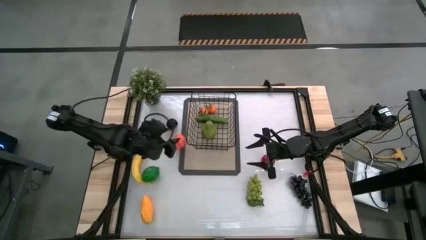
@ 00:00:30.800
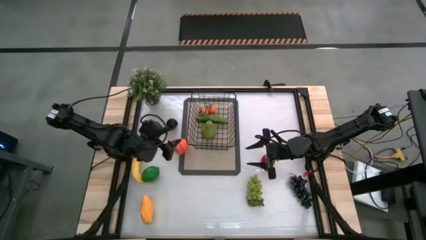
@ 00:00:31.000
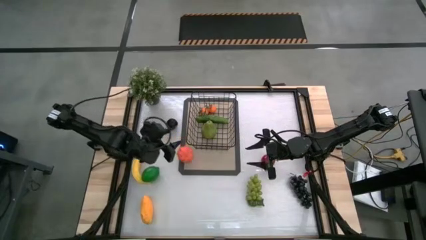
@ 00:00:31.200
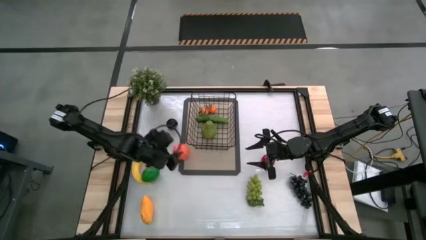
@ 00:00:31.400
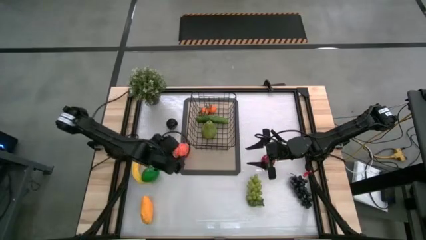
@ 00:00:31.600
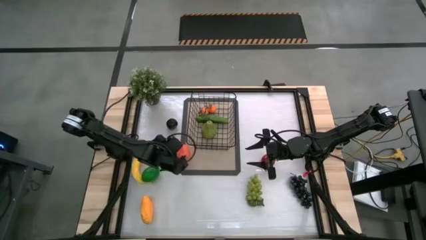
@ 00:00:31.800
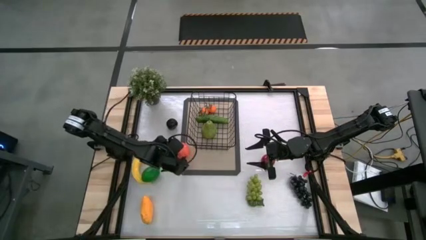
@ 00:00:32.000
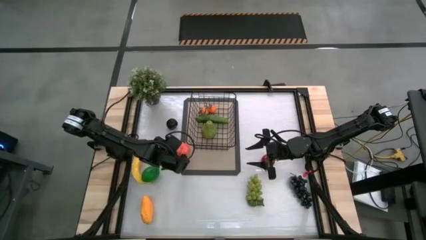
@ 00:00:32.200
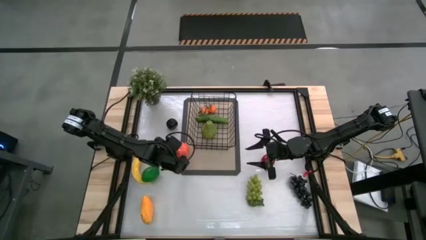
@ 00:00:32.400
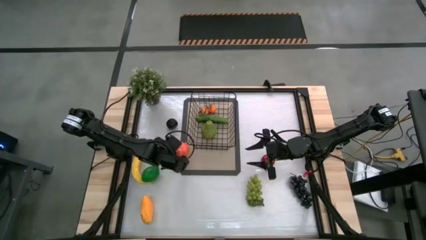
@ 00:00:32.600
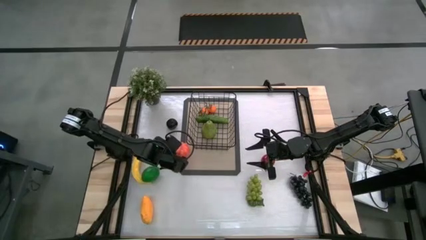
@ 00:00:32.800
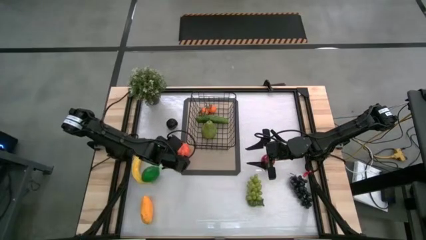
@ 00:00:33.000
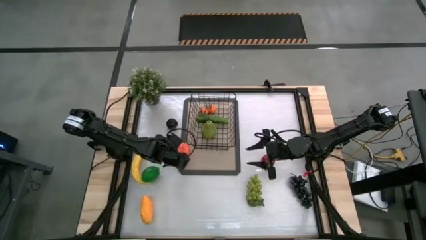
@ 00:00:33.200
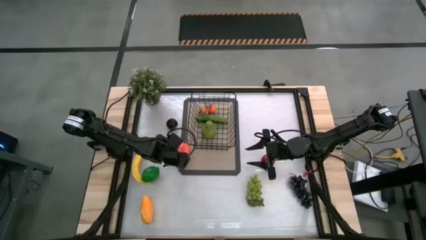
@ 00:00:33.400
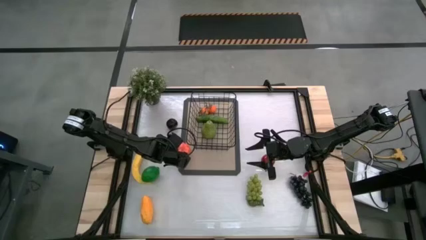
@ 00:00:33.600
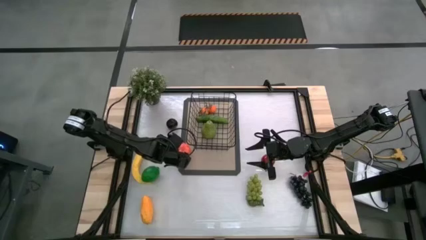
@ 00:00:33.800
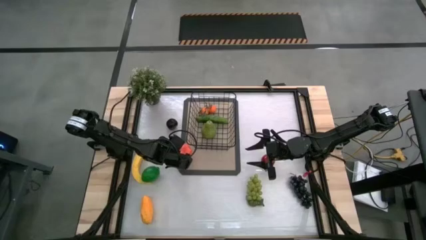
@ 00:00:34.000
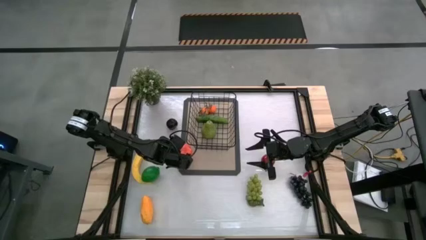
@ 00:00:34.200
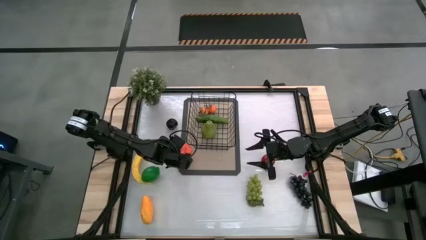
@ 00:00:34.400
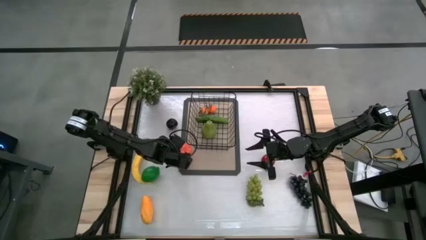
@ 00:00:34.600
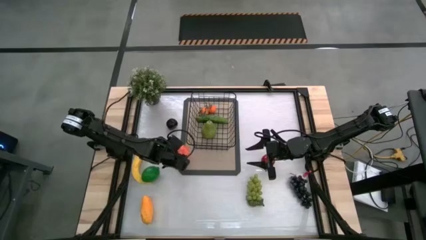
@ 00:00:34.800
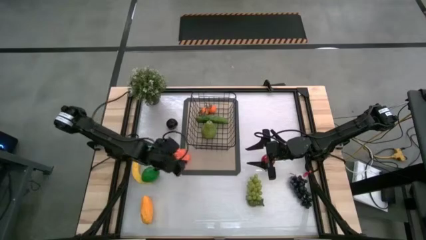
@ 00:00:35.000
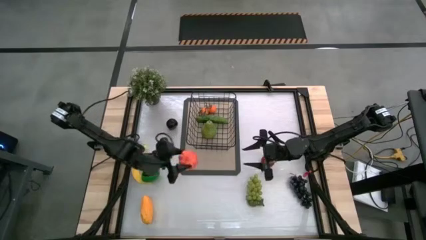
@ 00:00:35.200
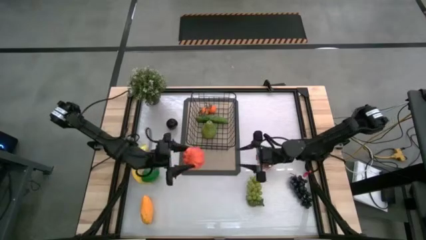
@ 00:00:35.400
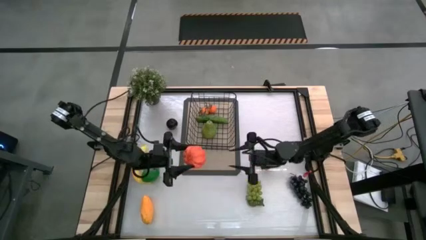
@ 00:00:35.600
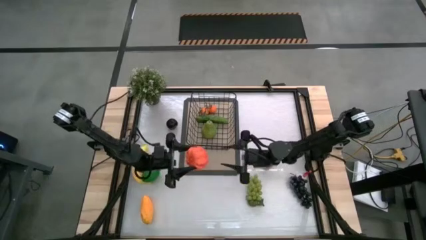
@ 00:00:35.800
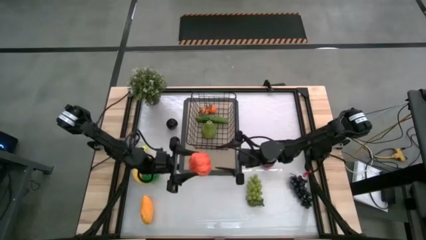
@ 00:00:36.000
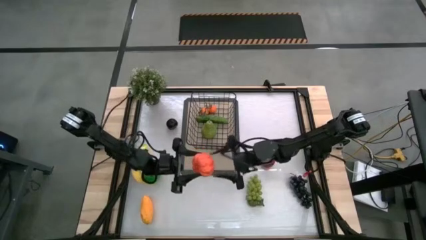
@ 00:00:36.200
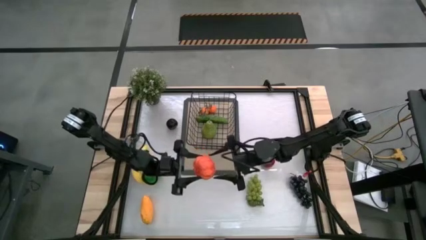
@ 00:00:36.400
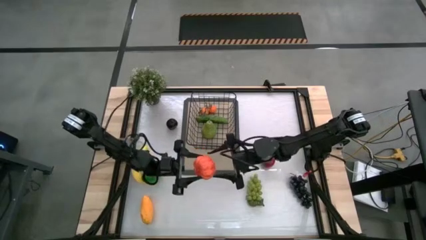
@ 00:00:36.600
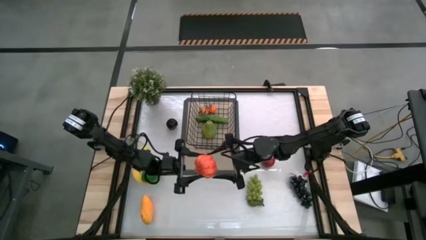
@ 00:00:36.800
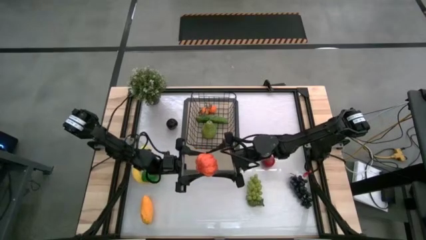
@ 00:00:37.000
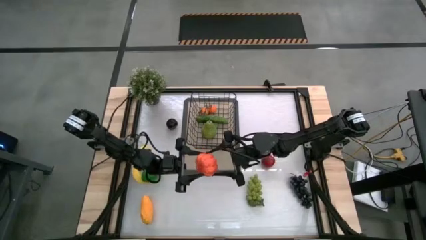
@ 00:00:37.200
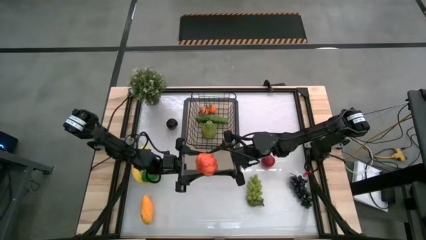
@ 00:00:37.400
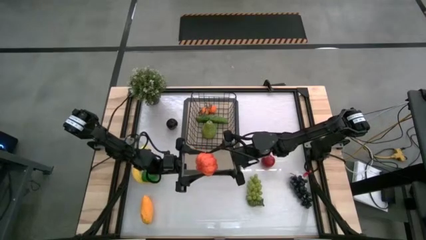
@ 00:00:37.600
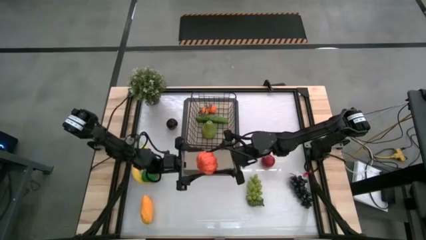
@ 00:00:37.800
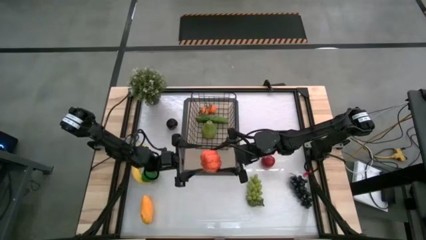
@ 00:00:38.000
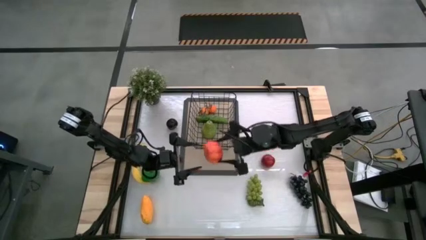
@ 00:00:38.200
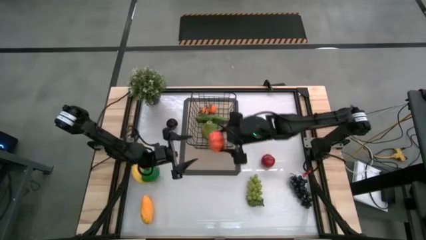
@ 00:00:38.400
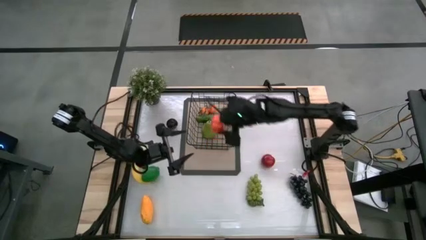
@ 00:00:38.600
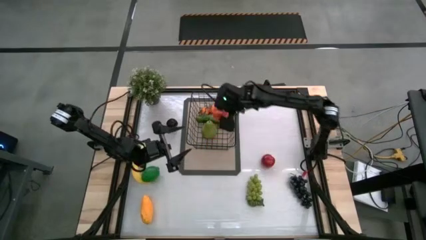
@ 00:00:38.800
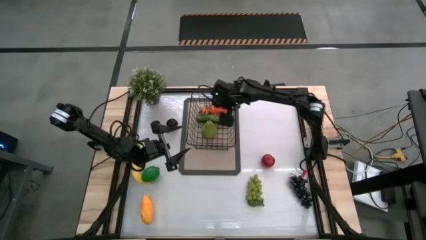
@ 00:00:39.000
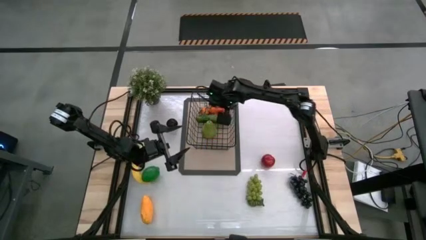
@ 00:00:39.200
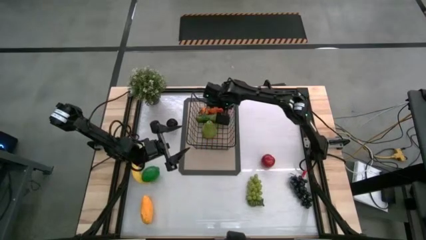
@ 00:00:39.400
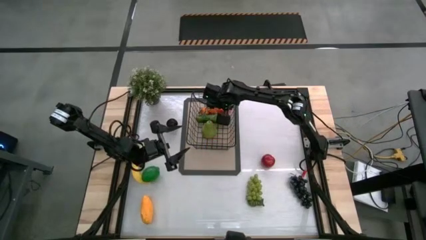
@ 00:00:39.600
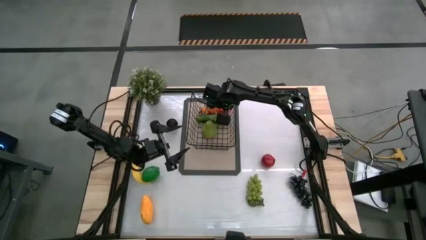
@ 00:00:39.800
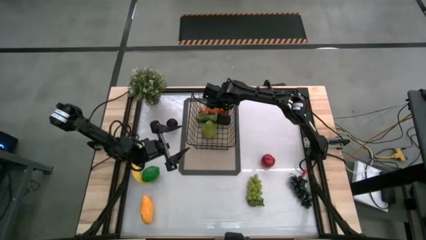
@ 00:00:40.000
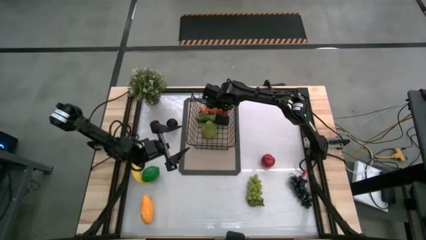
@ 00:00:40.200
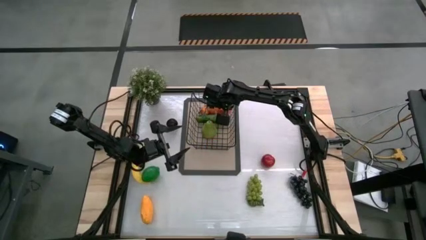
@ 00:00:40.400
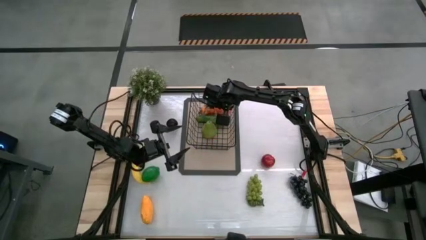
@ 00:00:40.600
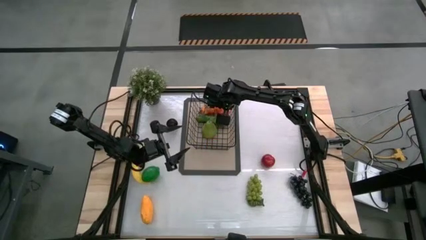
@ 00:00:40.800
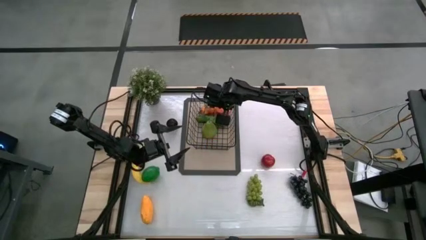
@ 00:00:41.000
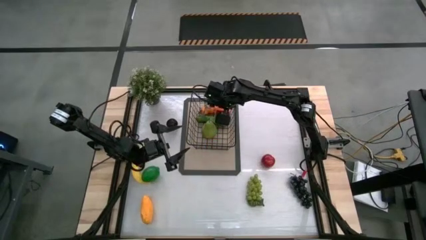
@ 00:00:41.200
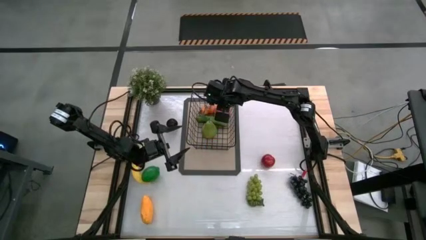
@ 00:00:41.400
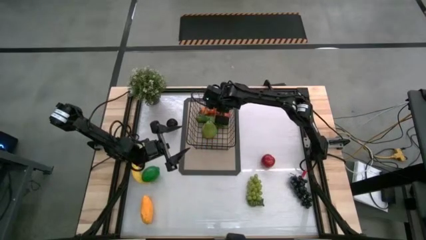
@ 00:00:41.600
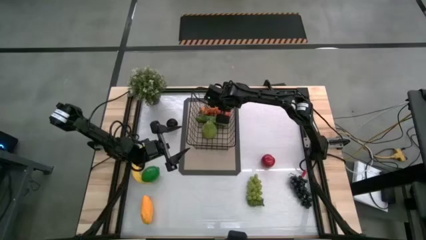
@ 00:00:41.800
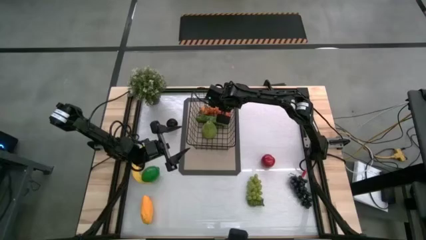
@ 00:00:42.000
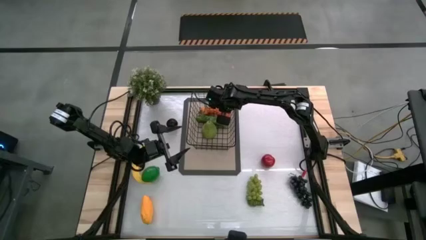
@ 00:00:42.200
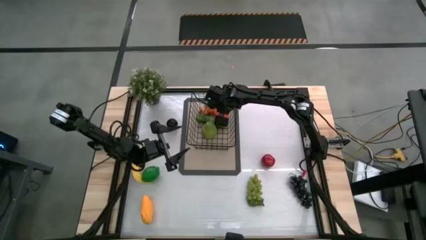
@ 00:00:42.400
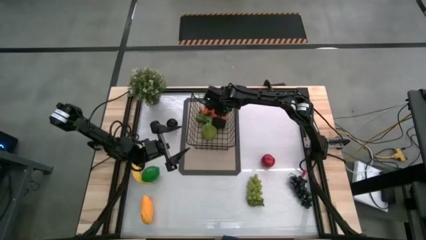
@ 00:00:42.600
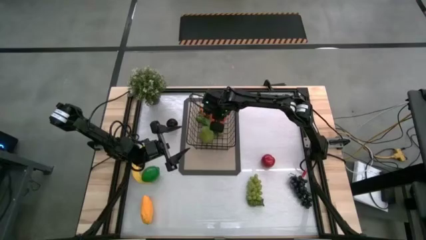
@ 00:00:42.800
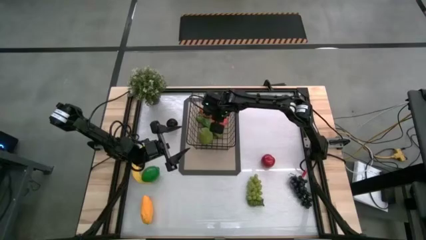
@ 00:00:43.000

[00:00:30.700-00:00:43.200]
Task: Build produce basket
Put the pumpkin into the black wire basket
